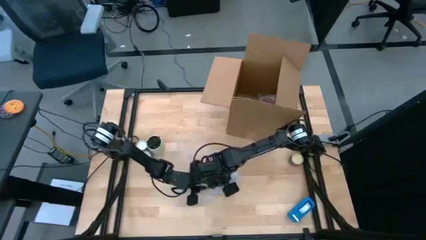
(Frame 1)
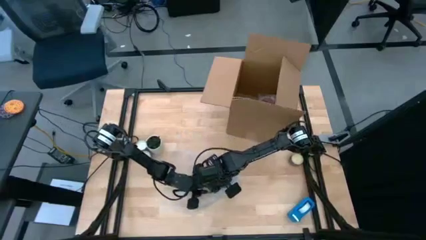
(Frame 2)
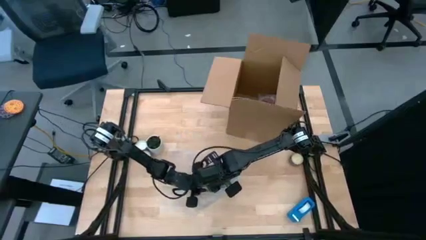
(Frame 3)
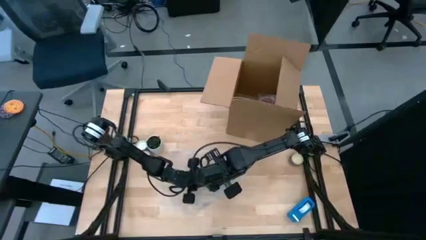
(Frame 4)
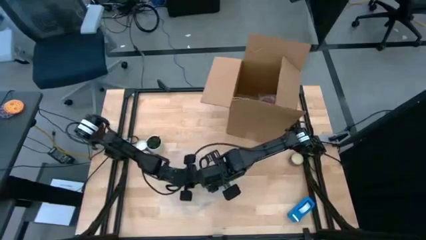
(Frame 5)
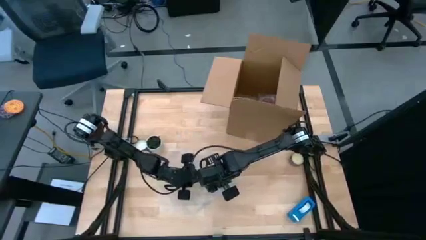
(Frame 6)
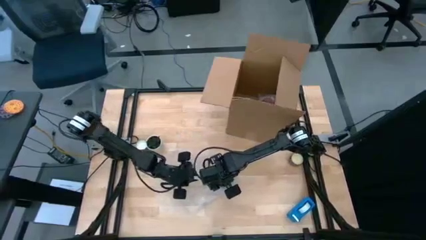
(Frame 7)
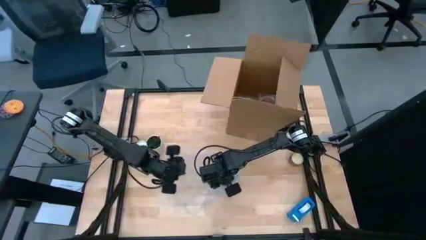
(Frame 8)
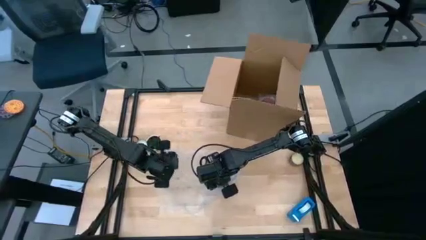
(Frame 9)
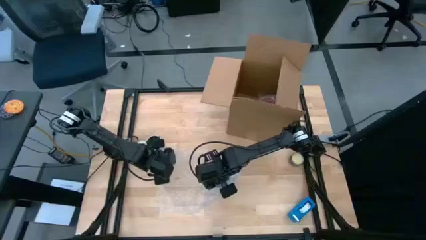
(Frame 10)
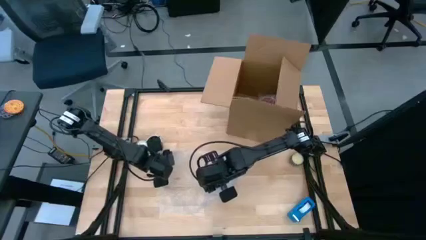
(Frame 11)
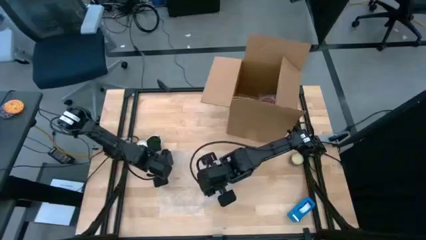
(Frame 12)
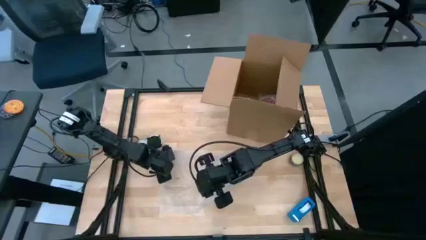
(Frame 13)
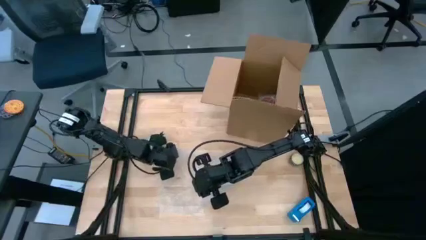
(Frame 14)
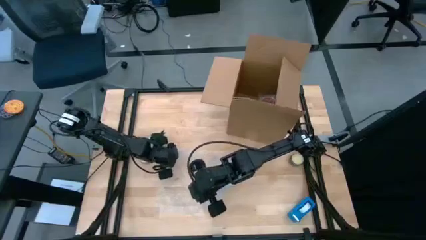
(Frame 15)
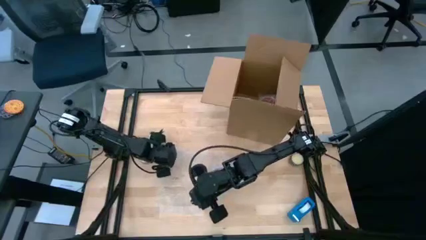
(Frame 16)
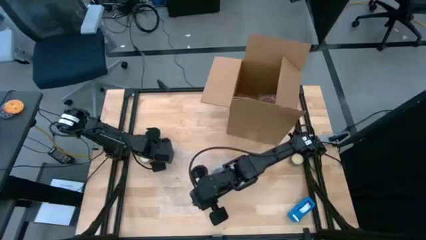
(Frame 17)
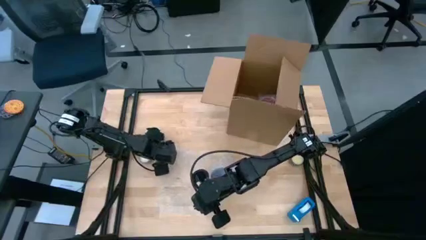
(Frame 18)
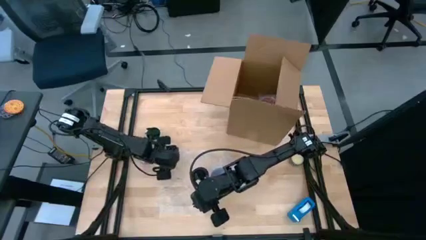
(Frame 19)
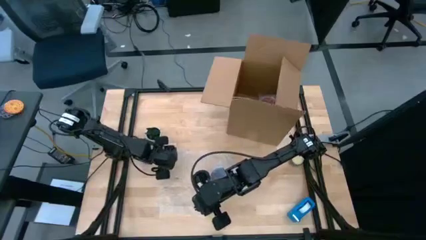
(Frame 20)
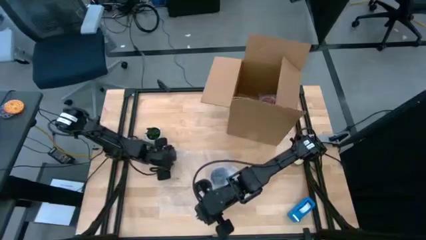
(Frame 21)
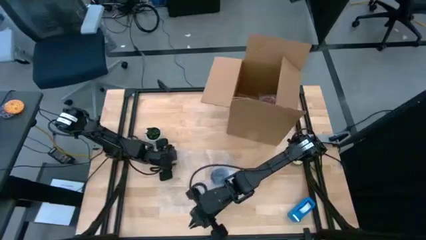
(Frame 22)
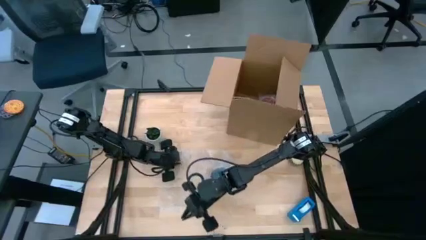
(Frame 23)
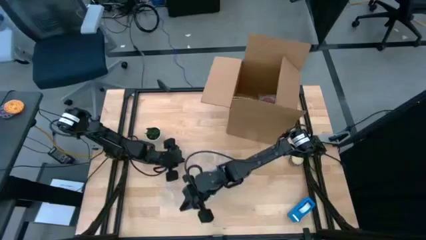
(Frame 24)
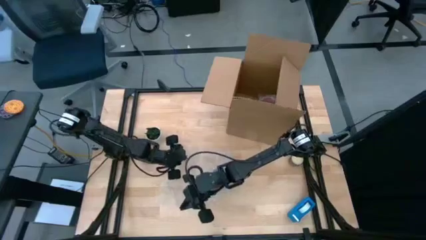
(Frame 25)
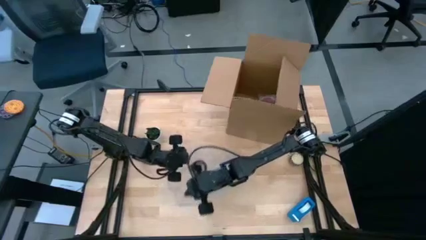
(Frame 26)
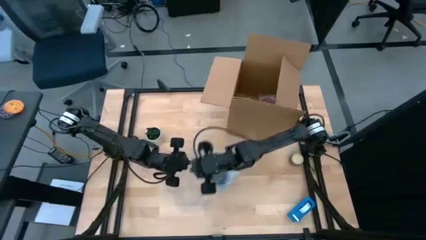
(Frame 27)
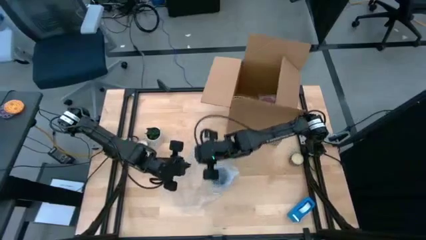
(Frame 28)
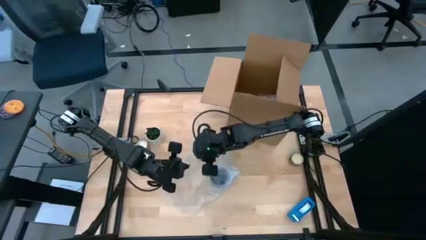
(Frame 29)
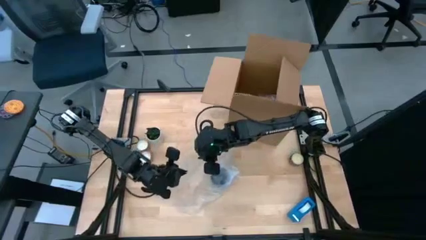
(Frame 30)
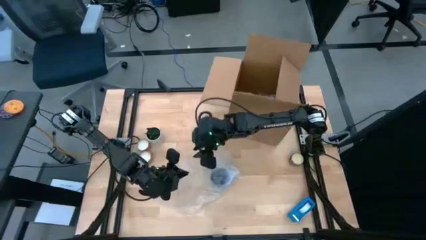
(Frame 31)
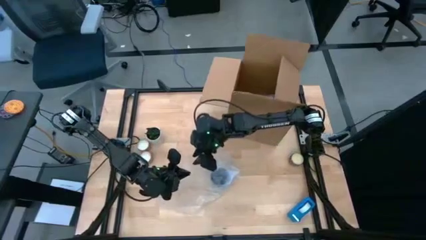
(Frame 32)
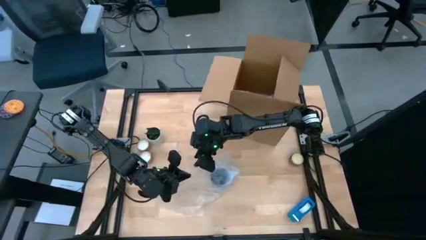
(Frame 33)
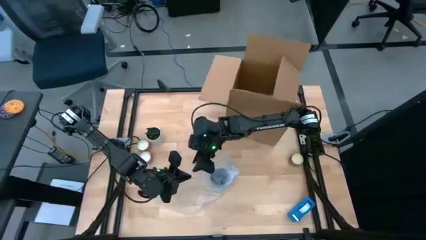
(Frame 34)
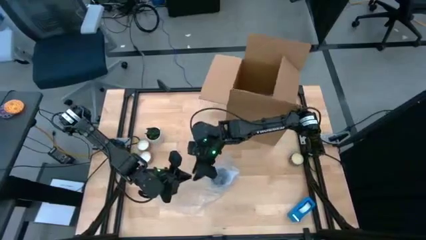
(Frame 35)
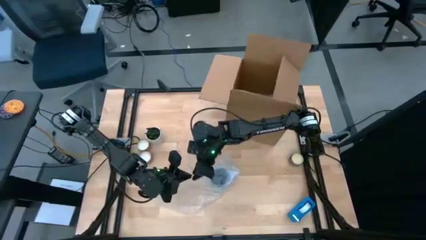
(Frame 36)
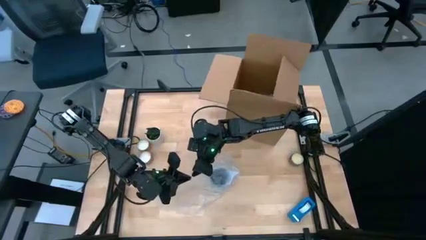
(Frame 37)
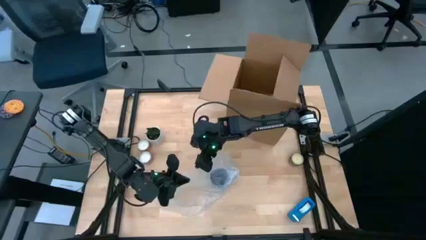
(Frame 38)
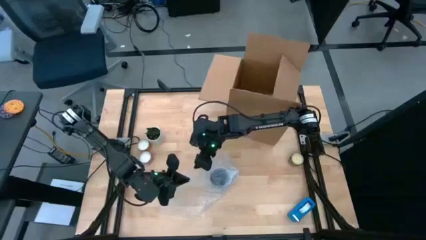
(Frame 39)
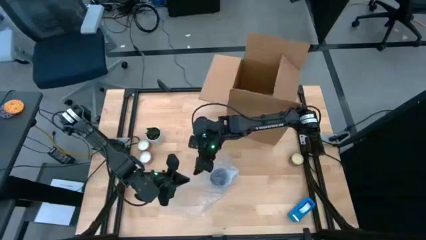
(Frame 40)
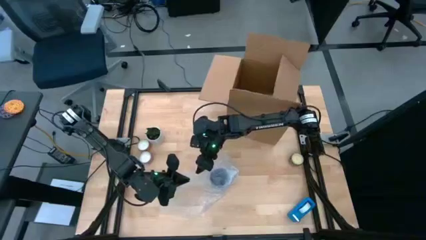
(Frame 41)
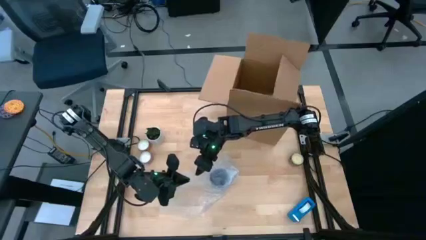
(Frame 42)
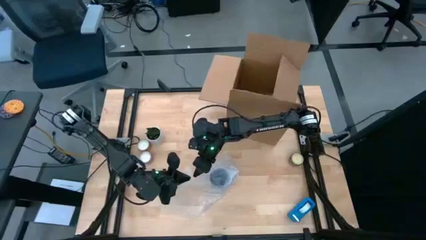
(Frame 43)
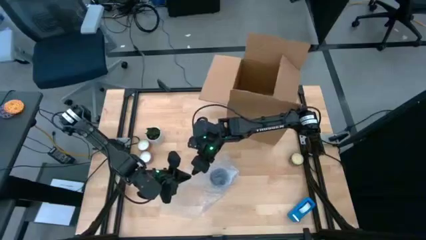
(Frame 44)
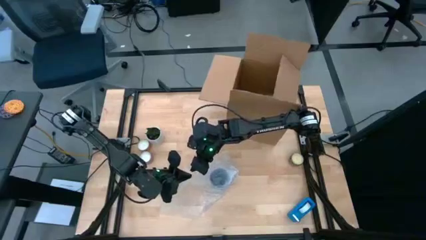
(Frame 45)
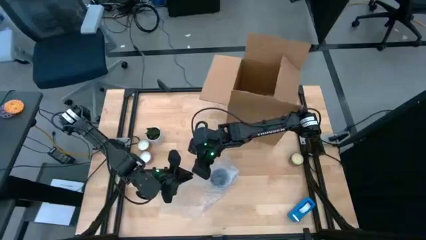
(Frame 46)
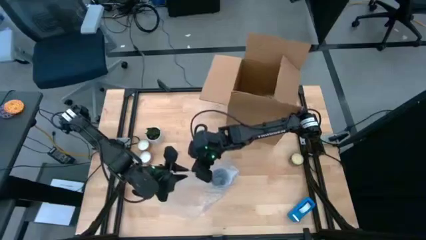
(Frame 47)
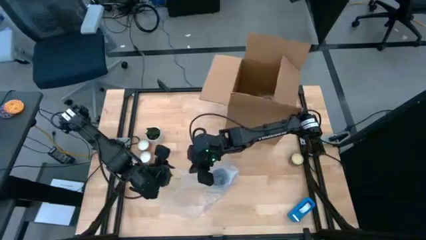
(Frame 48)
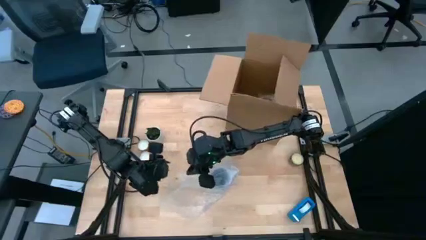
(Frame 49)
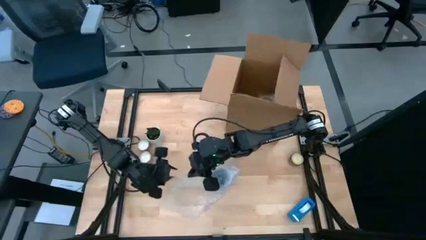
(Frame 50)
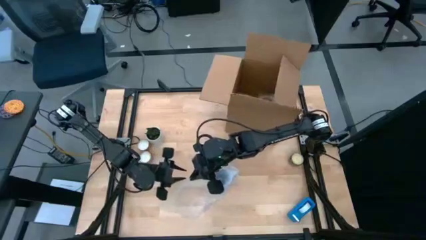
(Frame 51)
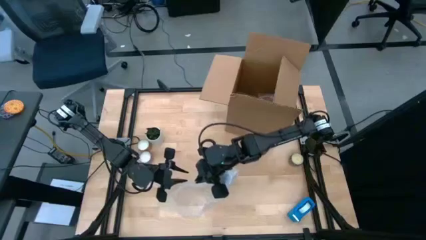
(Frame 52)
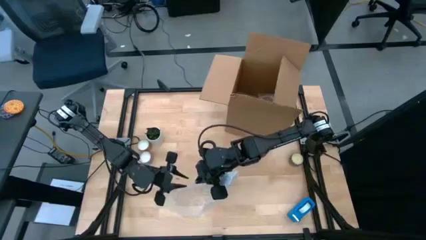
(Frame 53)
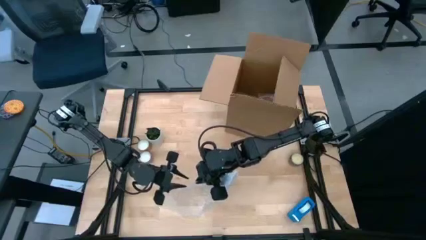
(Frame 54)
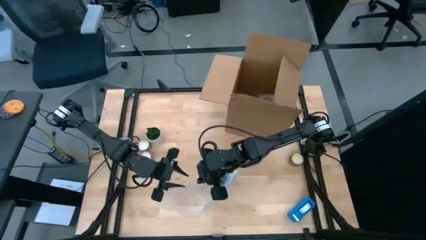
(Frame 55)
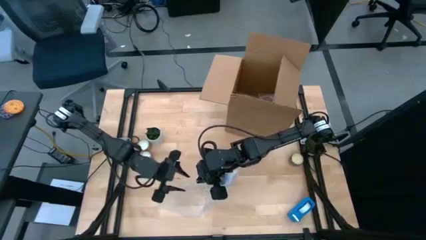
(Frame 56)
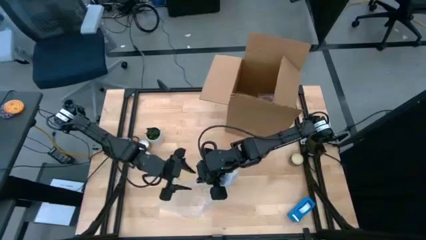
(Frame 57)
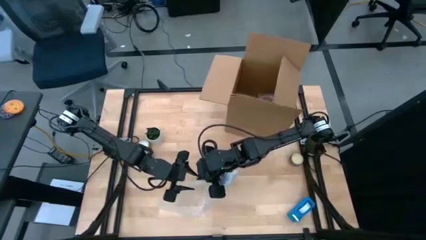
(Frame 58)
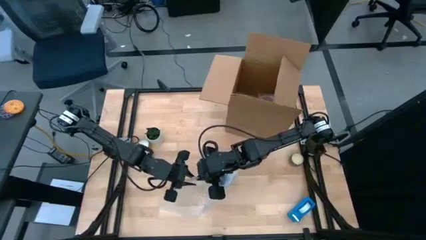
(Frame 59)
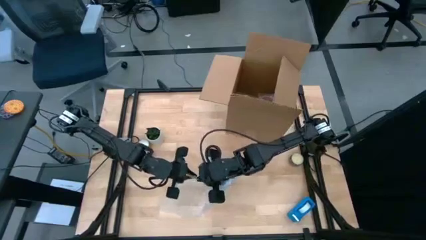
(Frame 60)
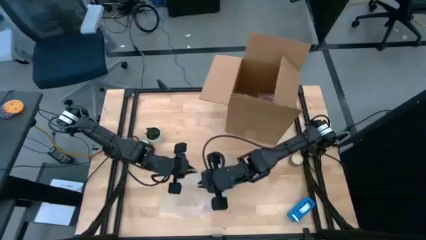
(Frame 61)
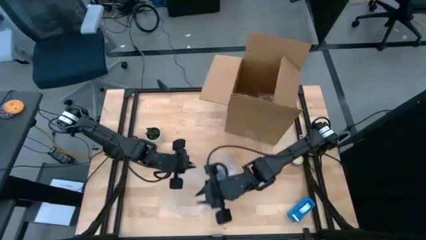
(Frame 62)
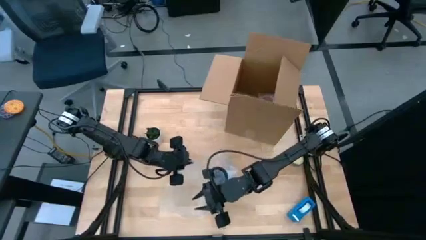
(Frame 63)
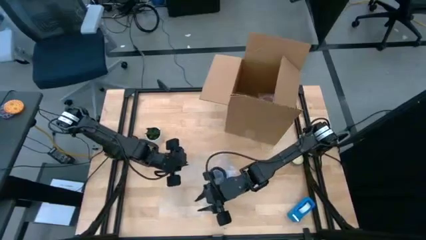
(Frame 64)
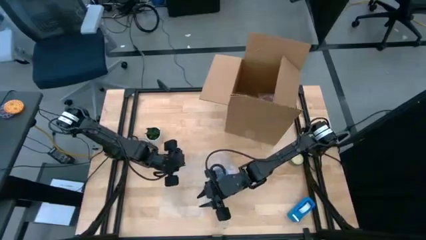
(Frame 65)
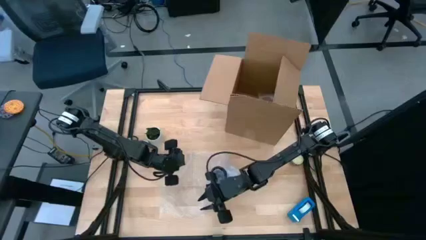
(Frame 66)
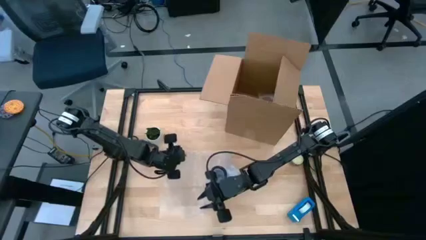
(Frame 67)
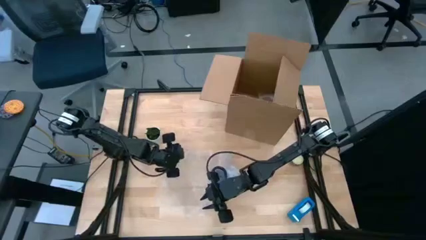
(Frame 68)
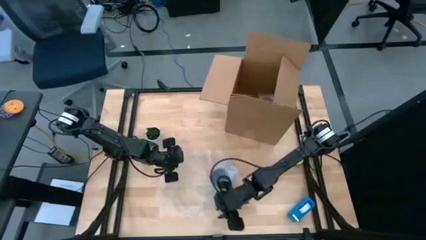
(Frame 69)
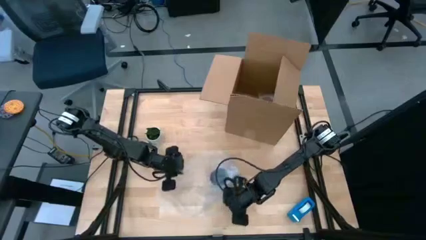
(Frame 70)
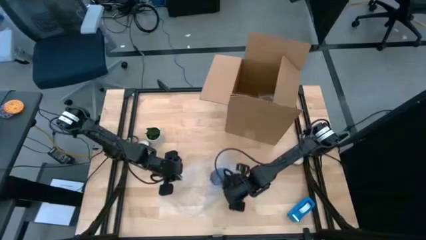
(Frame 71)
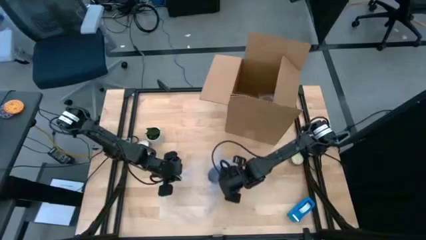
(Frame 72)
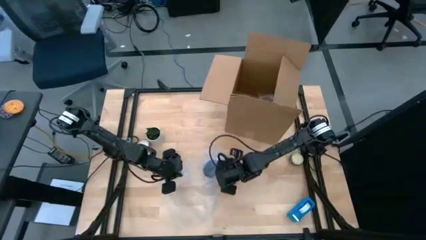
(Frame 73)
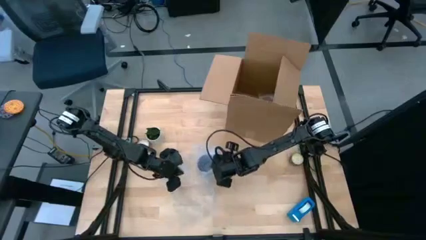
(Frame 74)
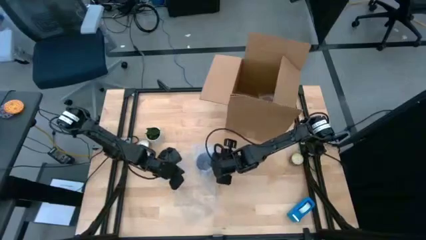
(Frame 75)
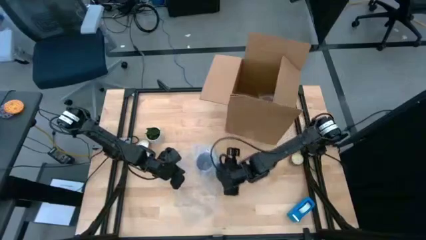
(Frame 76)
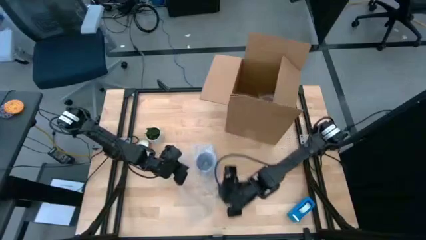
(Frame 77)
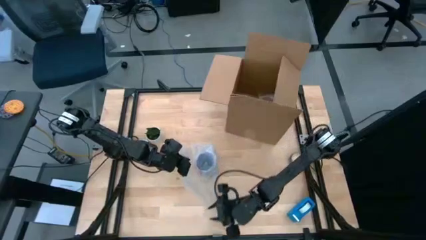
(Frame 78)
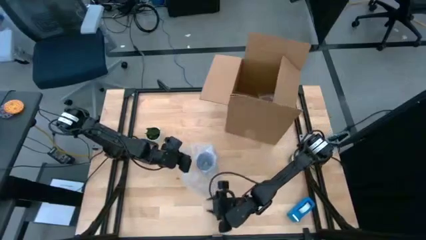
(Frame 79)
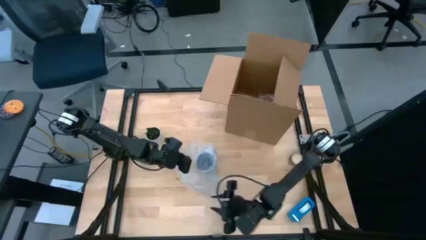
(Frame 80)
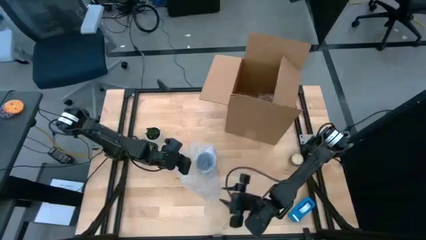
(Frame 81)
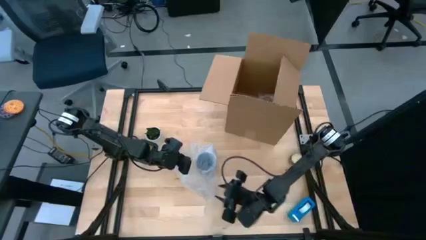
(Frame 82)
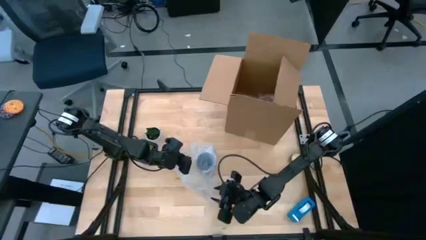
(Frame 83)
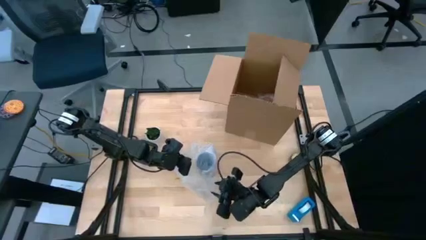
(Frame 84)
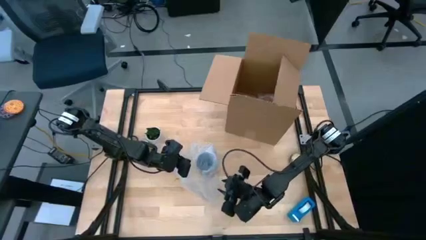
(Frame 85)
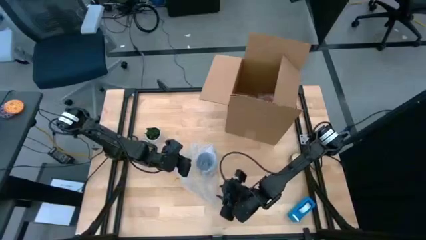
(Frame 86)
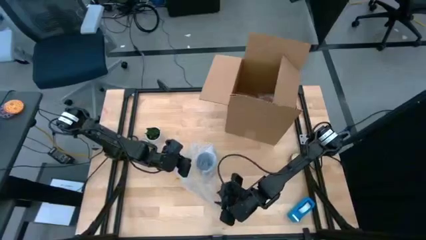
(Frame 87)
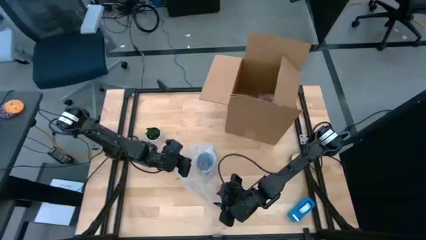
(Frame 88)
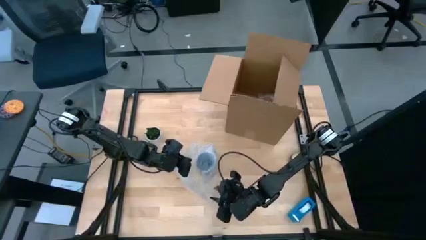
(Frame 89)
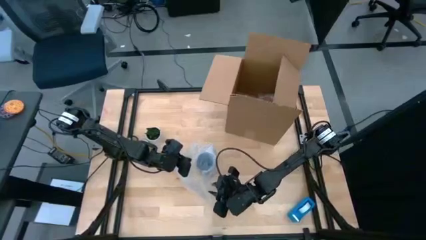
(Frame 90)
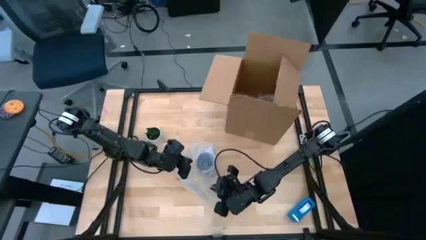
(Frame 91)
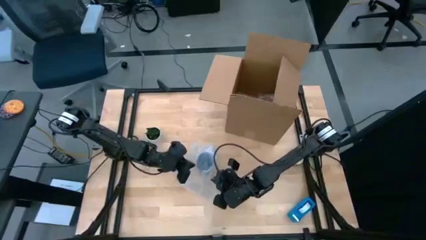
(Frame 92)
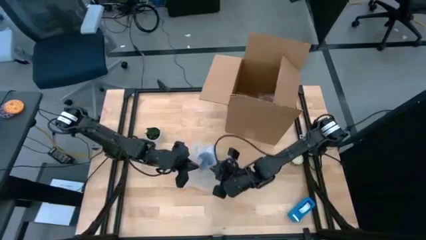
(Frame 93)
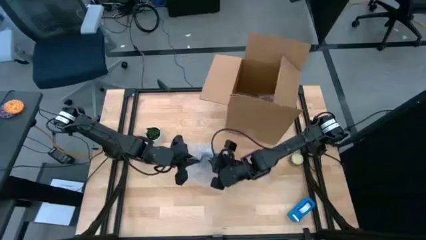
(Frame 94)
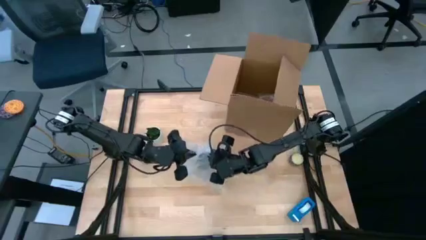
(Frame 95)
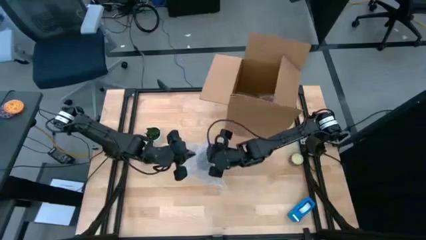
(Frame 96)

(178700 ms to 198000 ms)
Task: wrap mug
Wrap the purple mug with the bubble wrap
